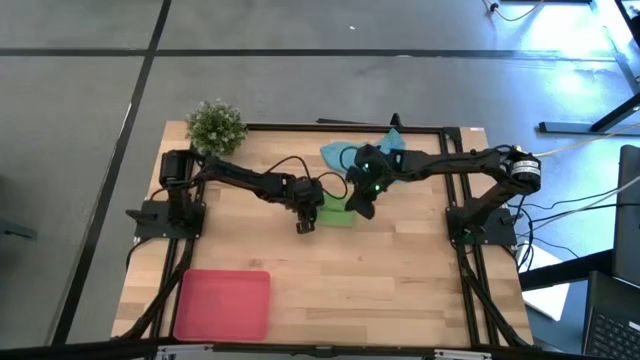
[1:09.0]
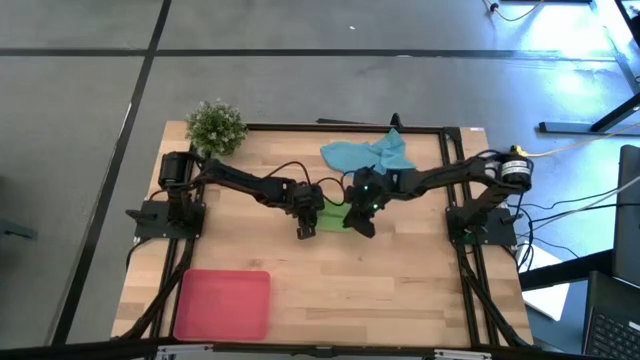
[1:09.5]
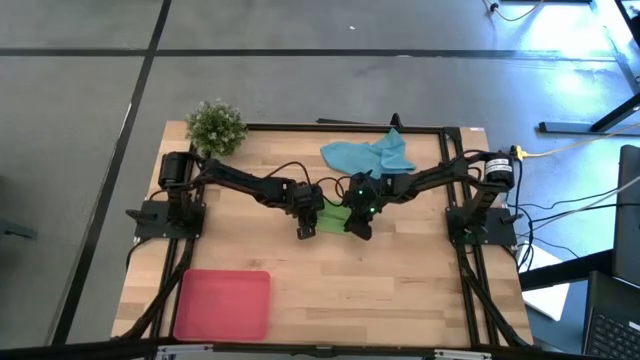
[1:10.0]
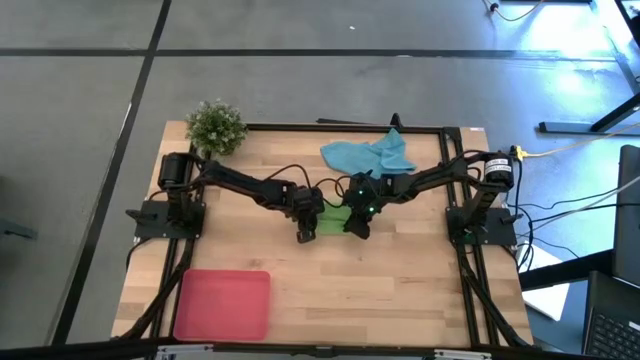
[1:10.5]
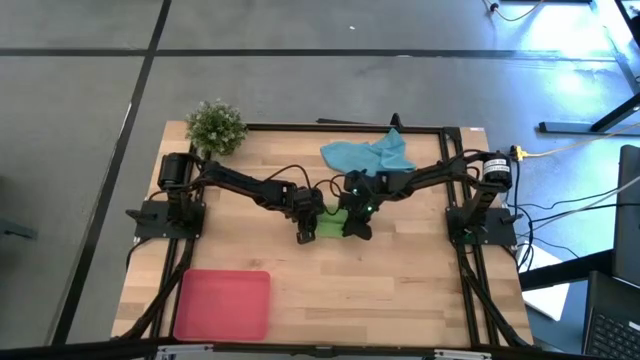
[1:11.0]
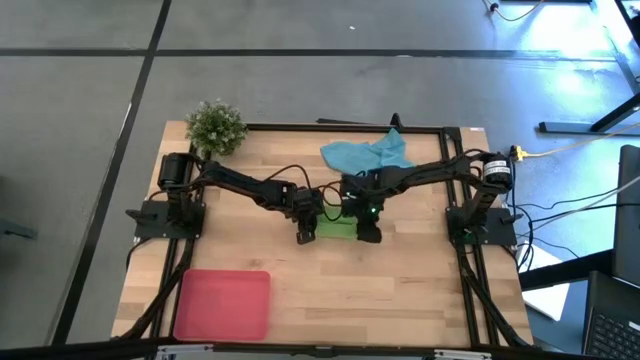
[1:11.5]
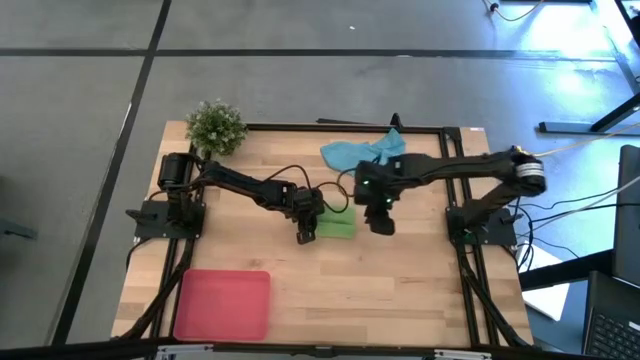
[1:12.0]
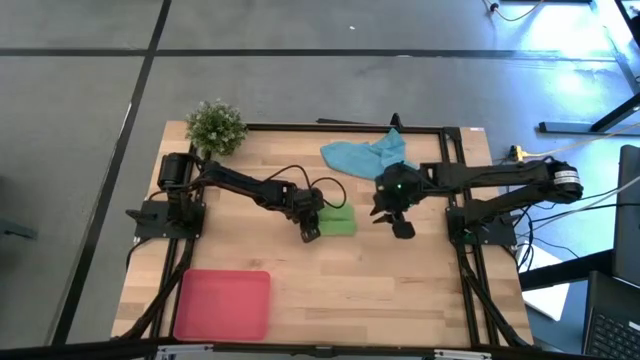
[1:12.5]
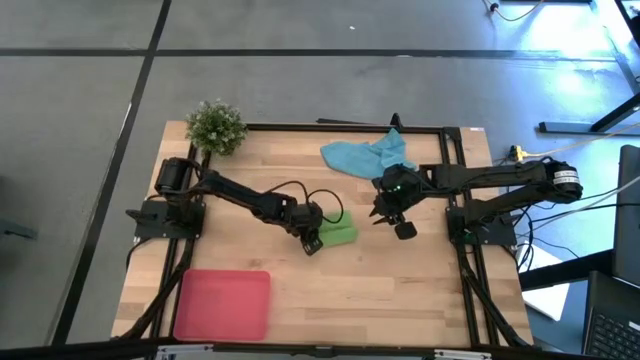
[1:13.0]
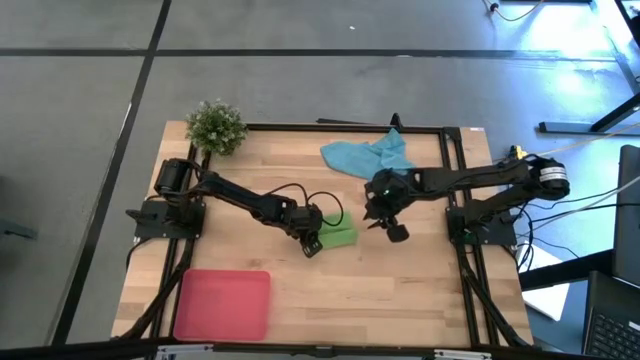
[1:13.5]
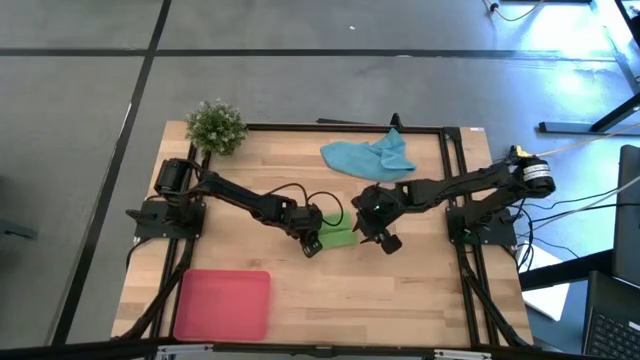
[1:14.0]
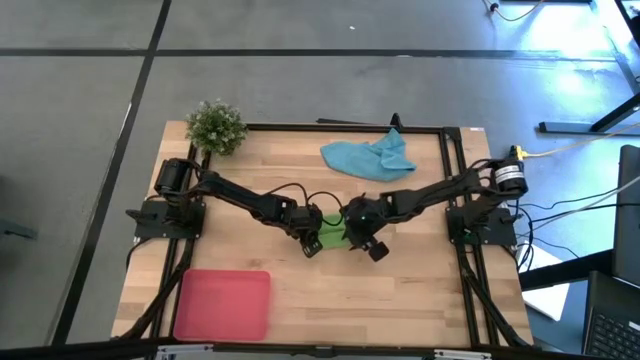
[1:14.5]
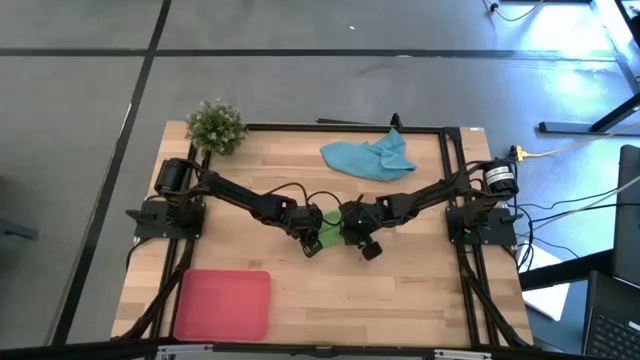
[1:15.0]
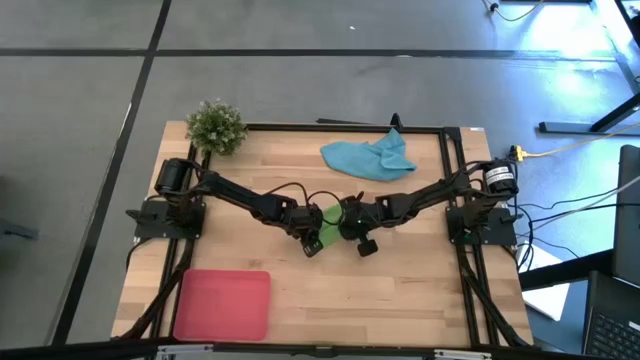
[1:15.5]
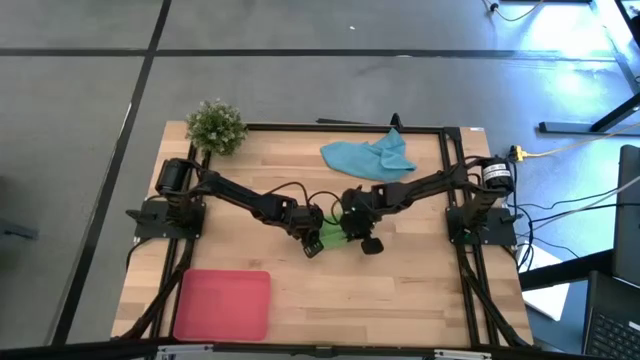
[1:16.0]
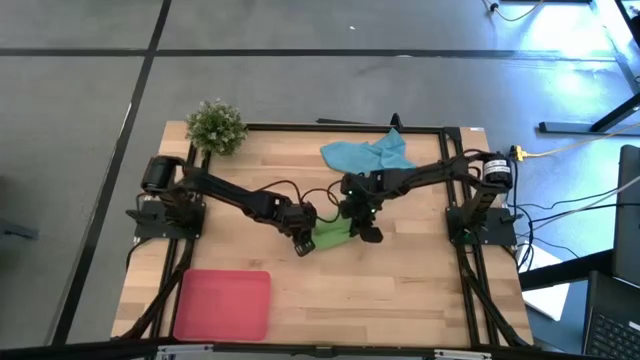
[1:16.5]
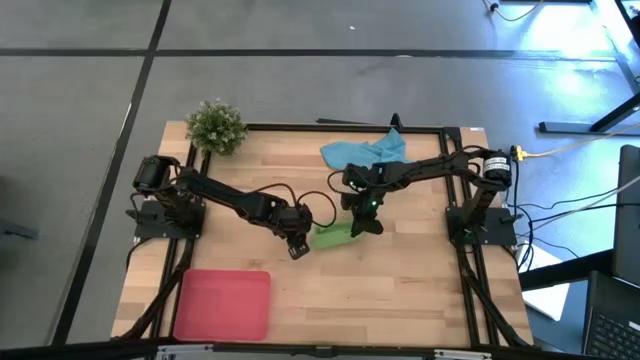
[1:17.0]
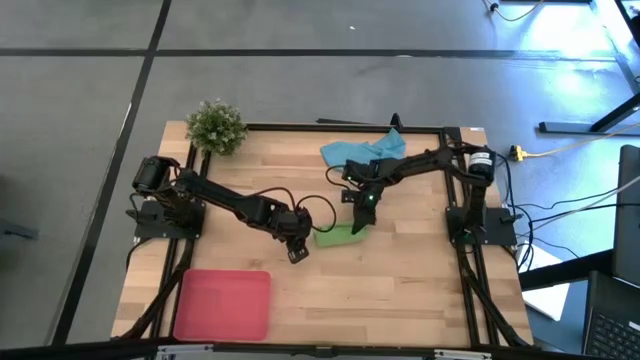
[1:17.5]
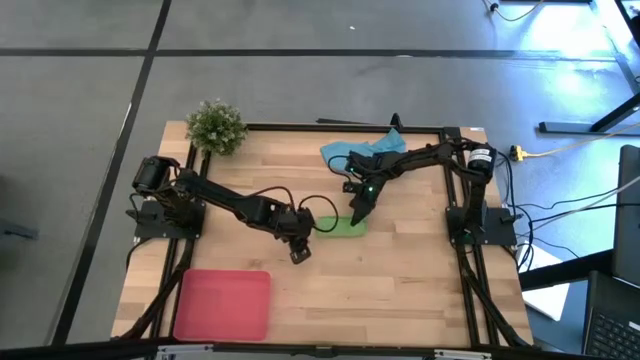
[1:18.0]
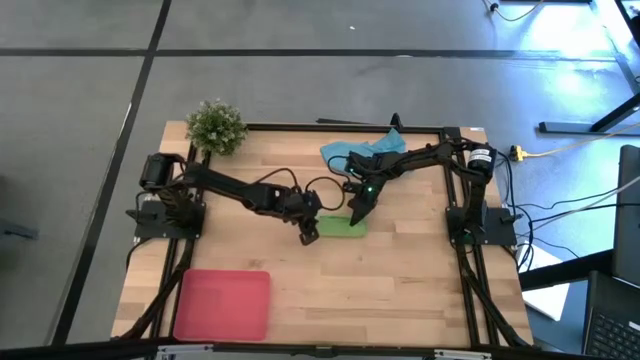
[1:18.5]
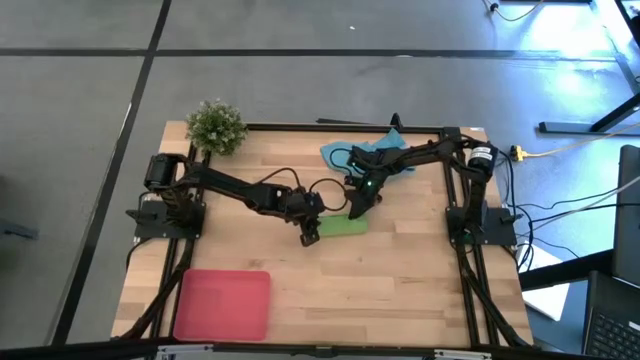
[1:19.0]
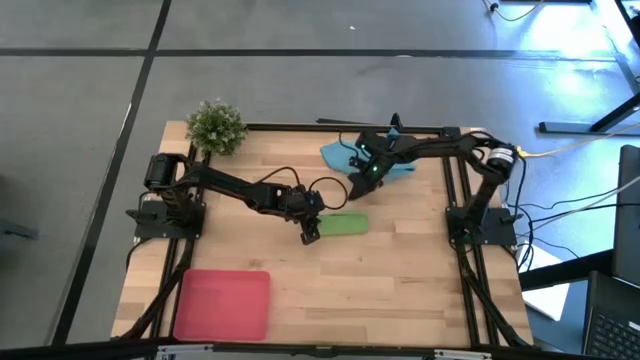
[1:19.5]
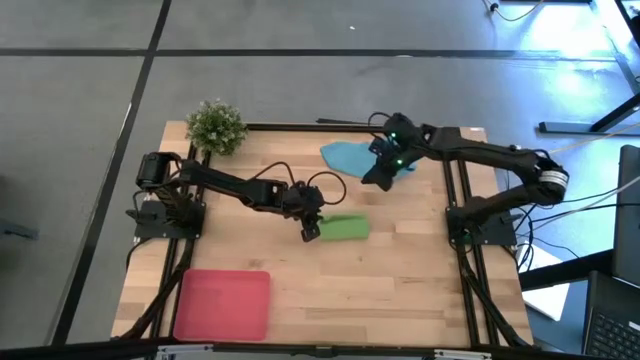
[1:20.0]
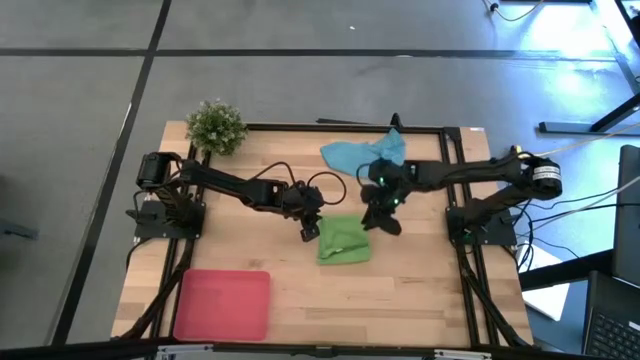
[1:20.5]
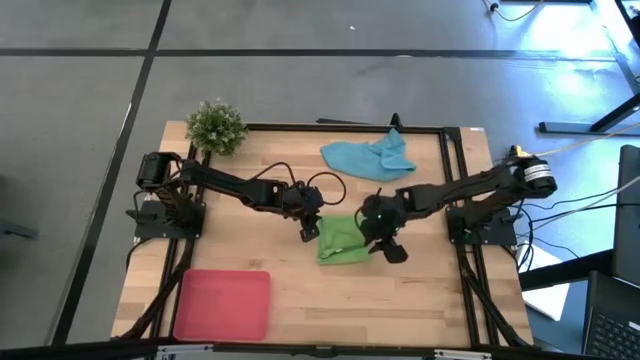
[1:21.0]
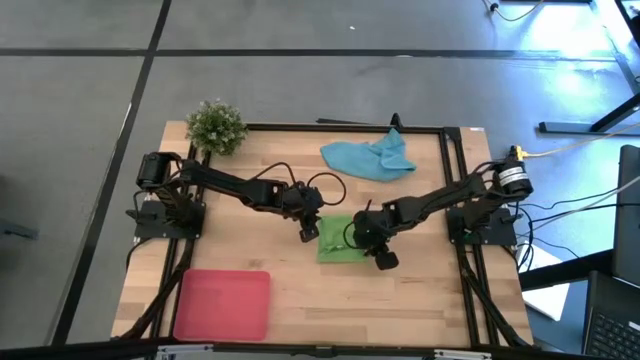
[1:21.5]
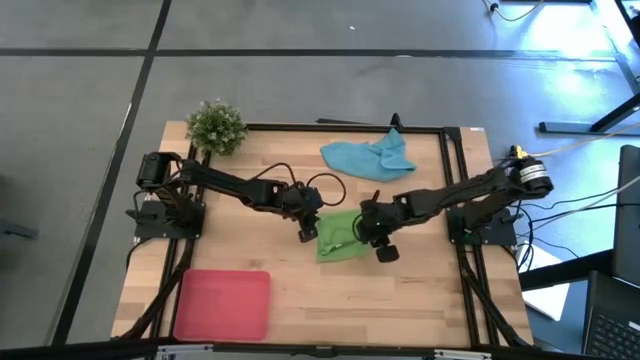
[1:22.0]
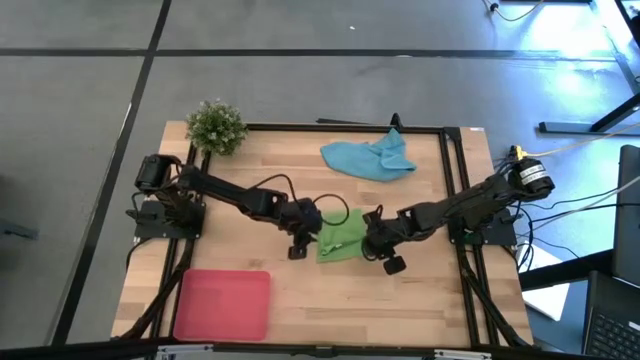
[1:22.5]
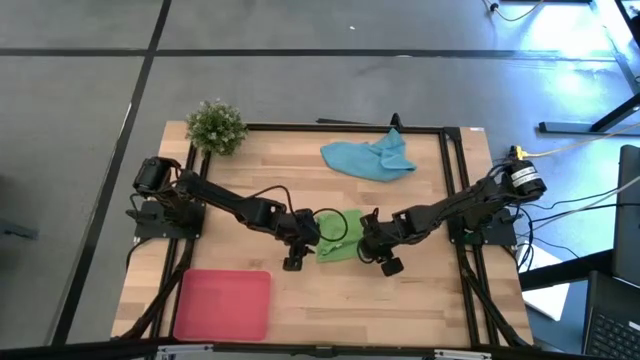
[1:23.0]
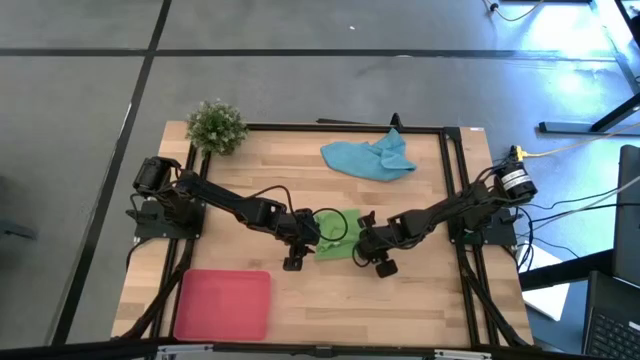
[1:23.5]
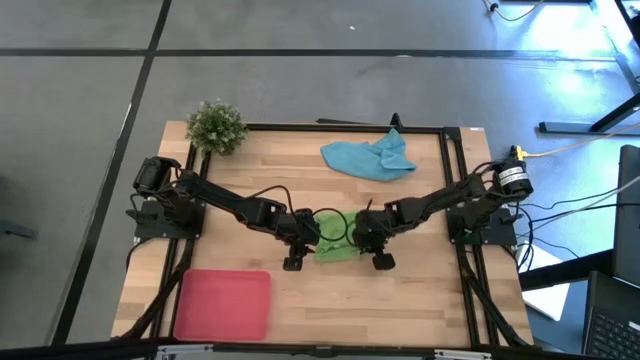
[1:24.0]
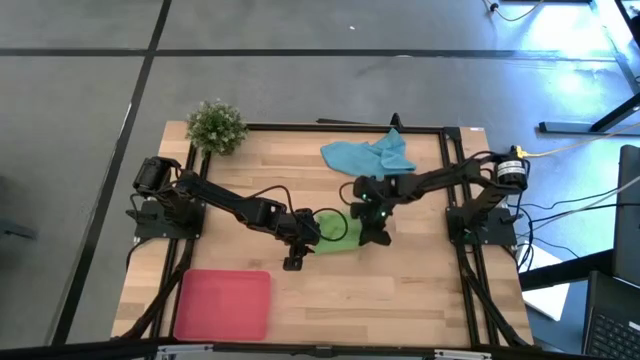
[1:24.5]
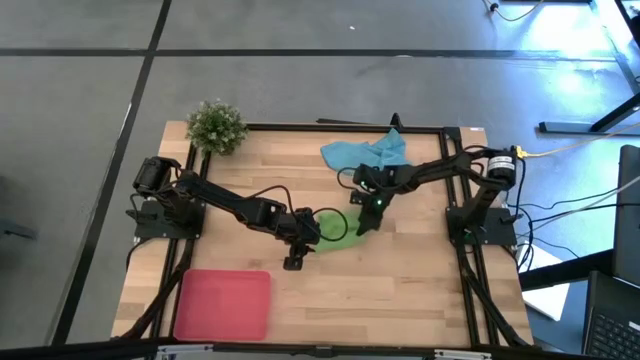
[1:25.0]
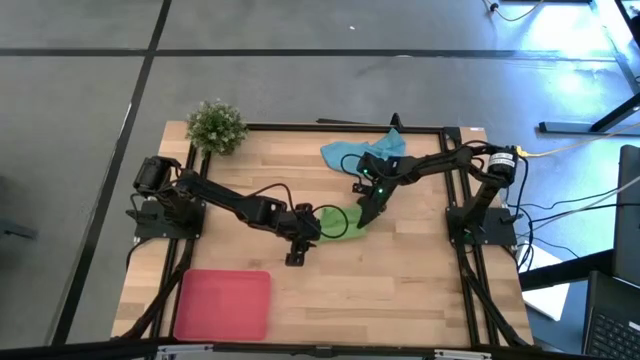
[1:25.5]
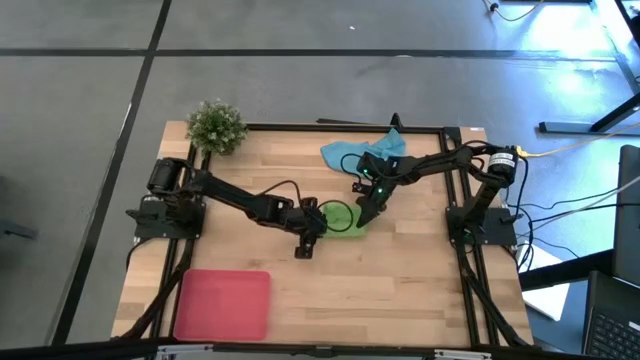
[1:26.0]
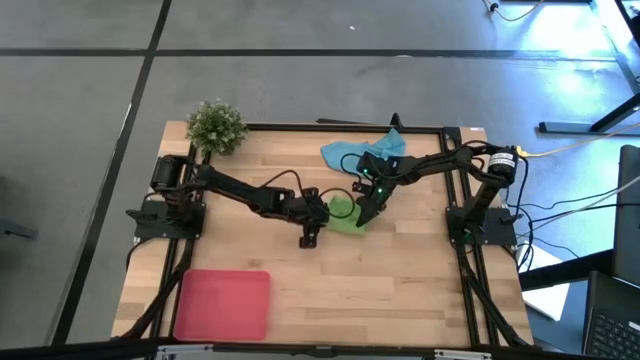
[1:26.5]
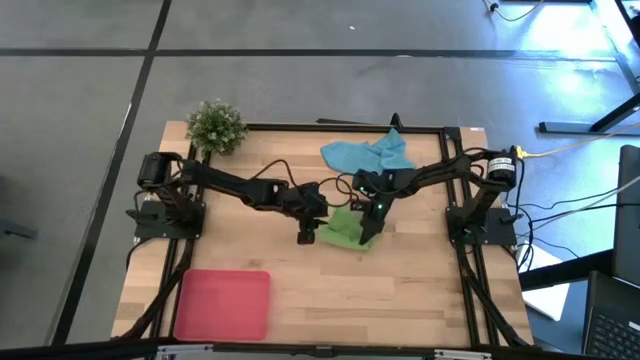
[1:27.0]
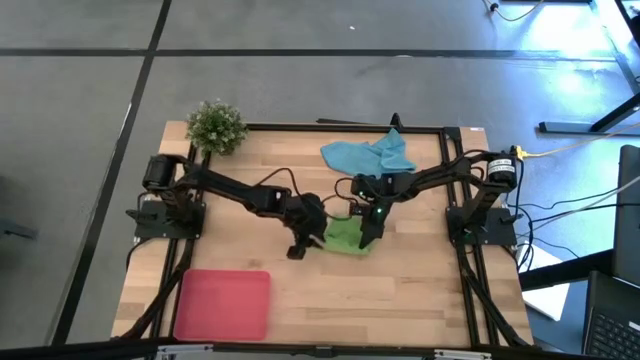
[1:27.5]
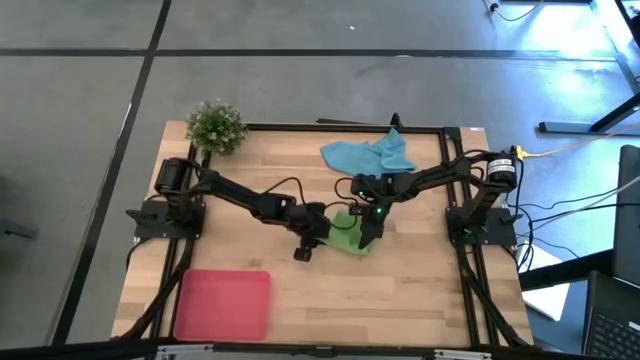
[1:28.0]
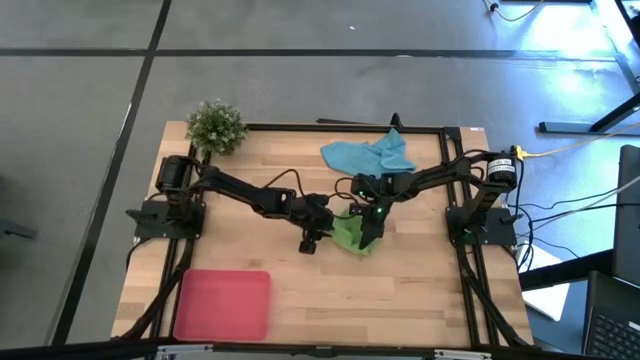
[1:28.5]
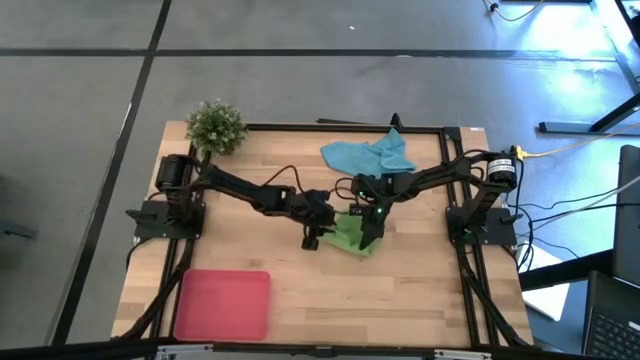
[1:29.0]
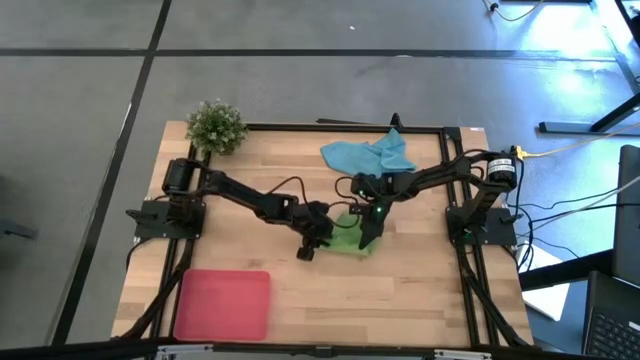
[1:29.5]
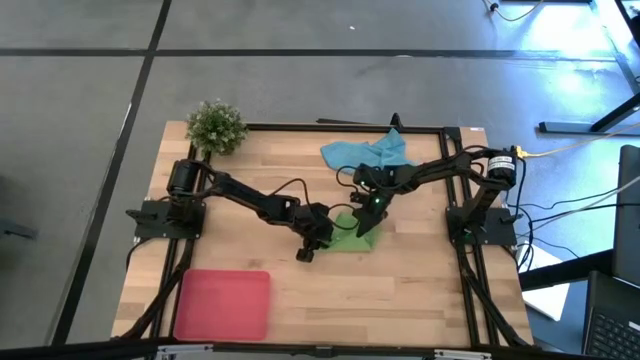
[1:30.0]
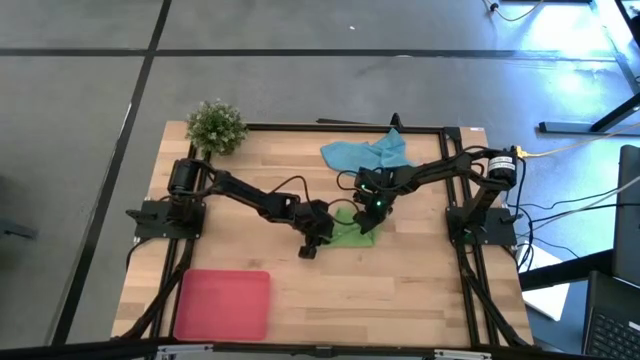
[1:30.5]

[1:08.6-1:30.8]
Task: Roll microfiber towels into tight, uniform cylinder then place into a basket
Roll the microfiber green towel
